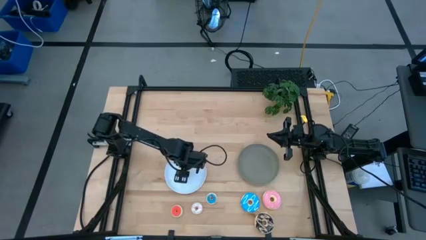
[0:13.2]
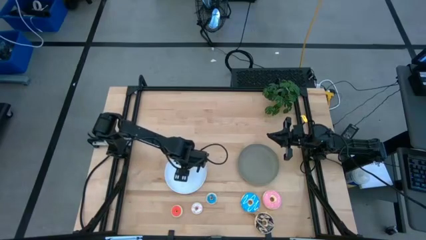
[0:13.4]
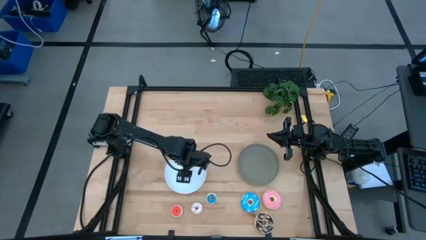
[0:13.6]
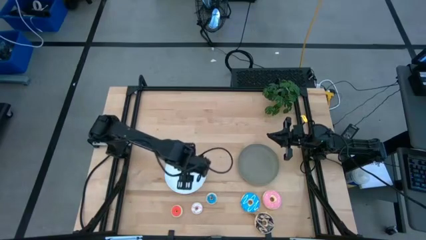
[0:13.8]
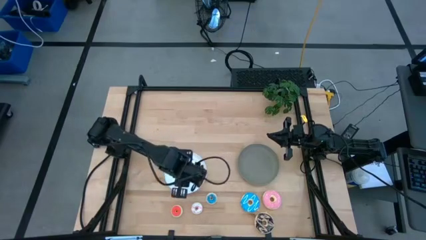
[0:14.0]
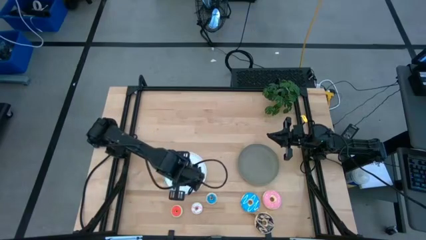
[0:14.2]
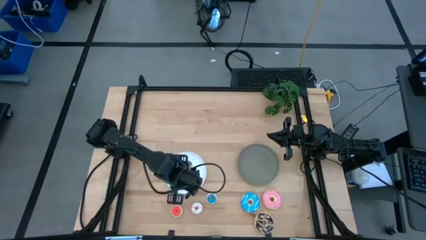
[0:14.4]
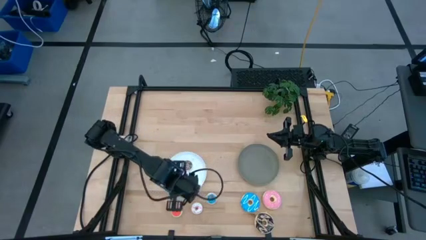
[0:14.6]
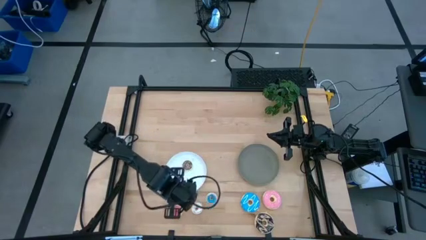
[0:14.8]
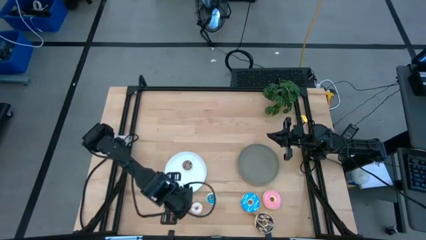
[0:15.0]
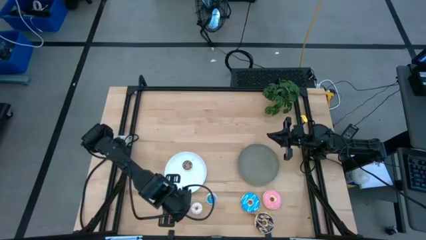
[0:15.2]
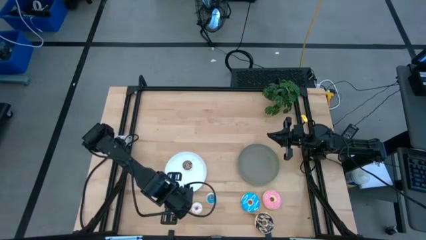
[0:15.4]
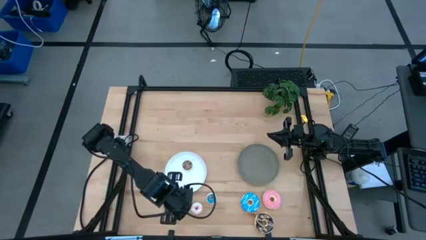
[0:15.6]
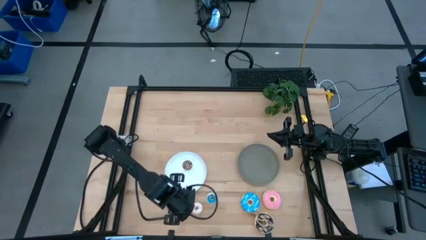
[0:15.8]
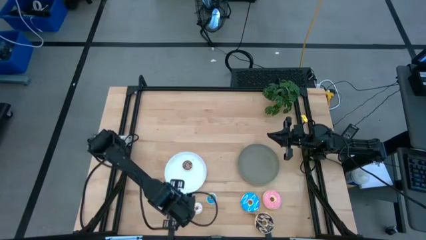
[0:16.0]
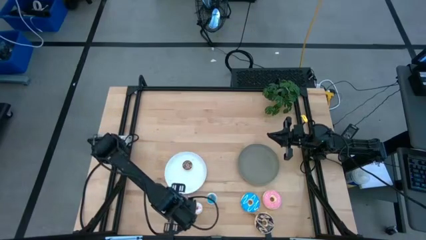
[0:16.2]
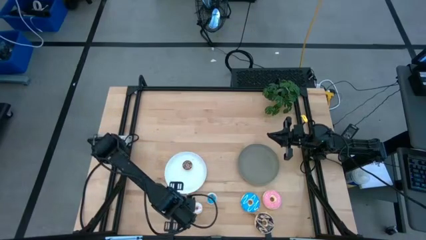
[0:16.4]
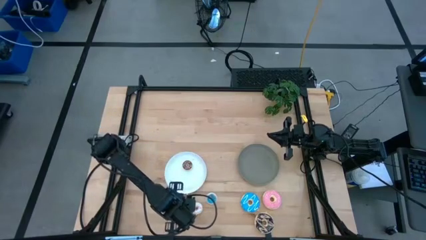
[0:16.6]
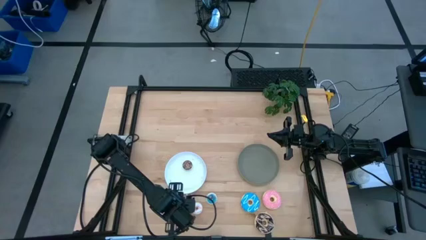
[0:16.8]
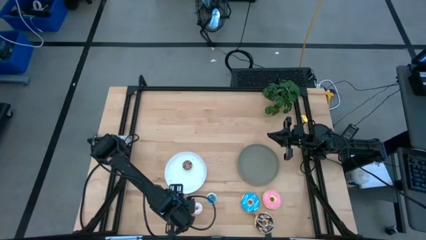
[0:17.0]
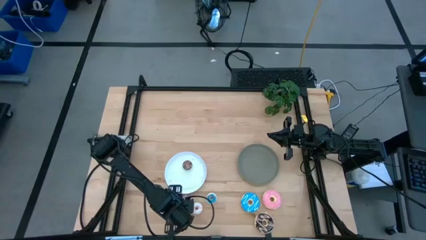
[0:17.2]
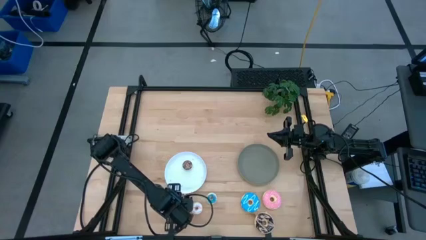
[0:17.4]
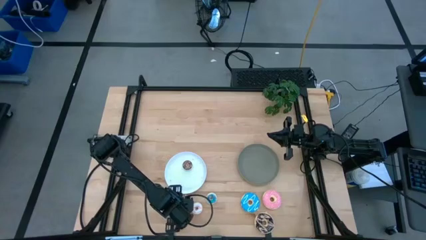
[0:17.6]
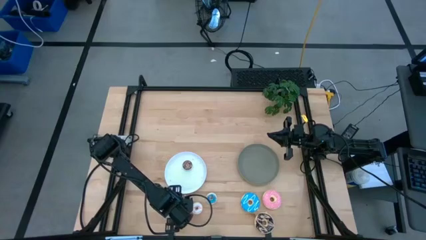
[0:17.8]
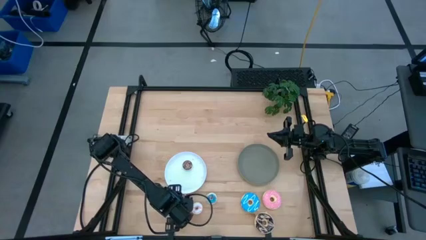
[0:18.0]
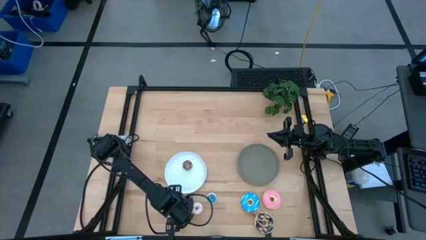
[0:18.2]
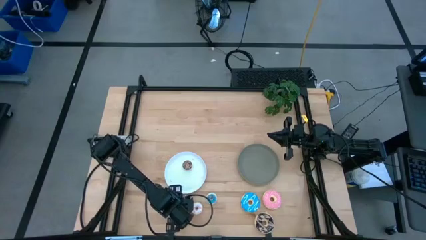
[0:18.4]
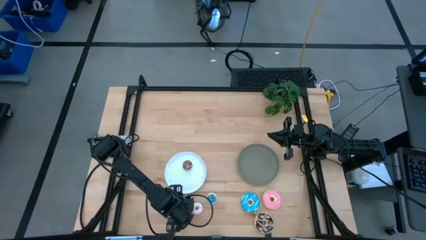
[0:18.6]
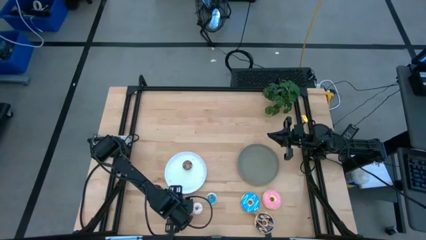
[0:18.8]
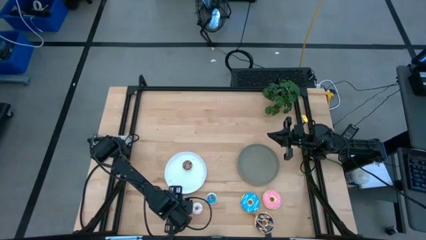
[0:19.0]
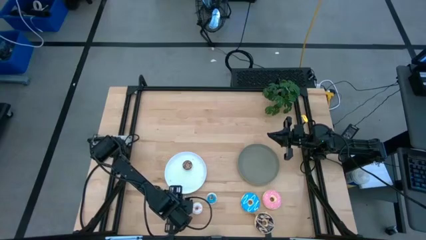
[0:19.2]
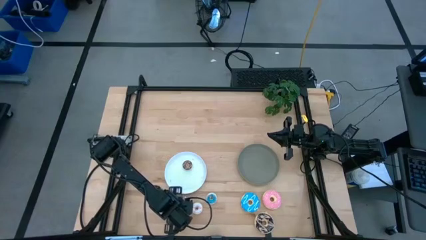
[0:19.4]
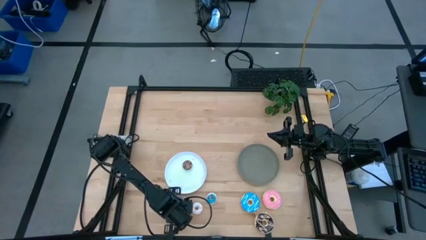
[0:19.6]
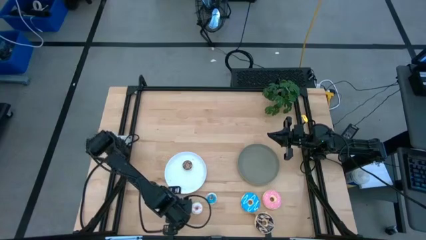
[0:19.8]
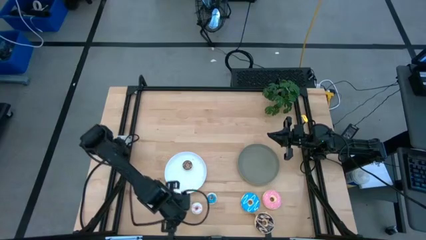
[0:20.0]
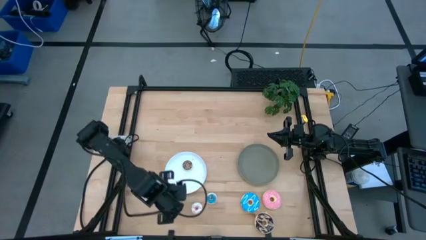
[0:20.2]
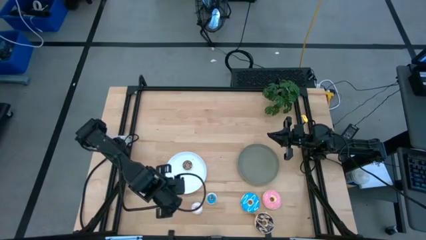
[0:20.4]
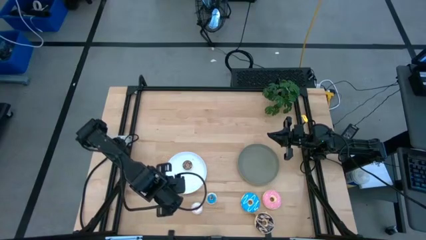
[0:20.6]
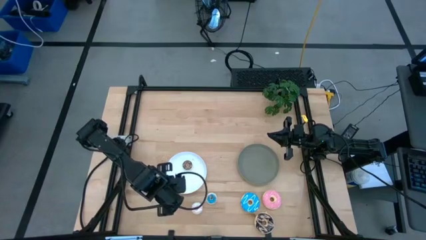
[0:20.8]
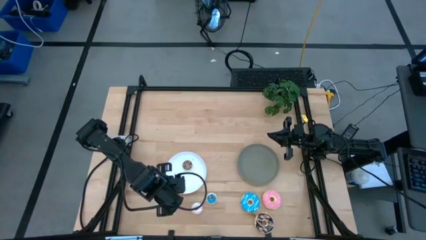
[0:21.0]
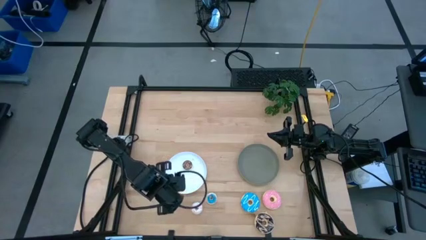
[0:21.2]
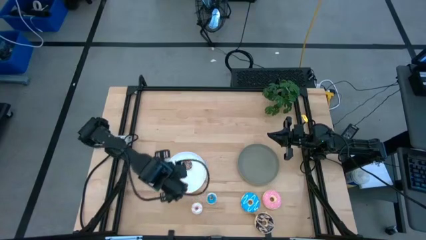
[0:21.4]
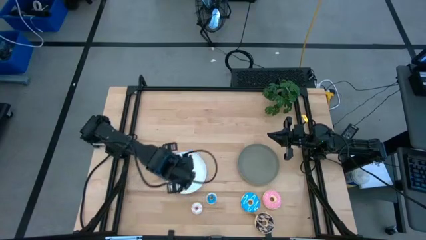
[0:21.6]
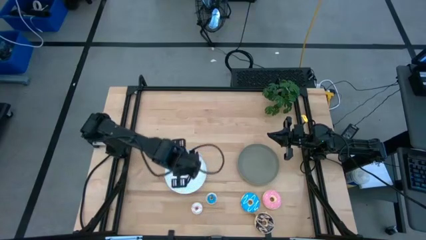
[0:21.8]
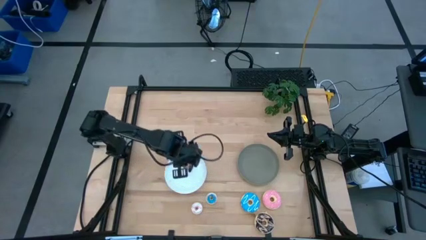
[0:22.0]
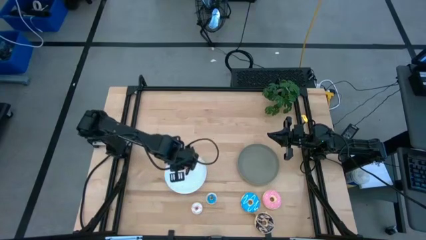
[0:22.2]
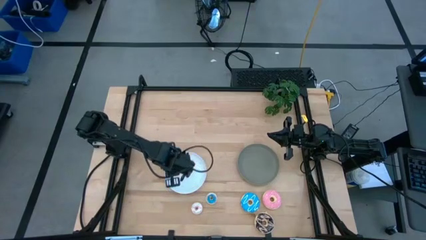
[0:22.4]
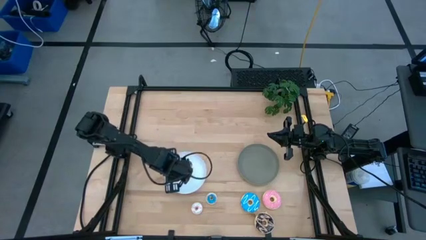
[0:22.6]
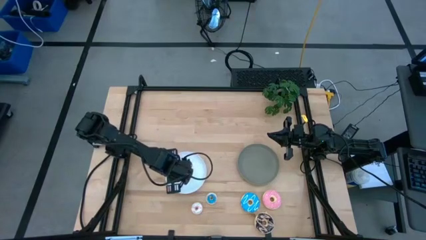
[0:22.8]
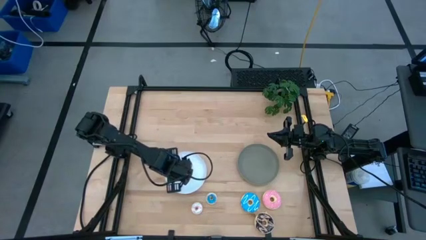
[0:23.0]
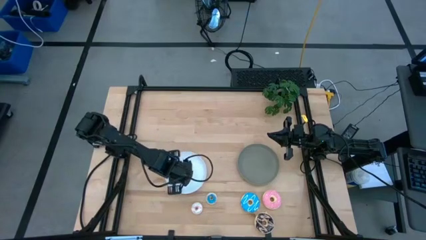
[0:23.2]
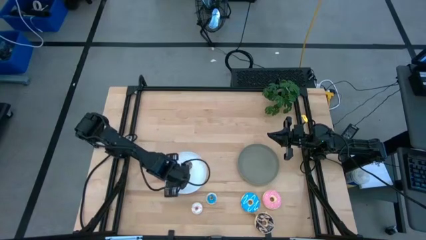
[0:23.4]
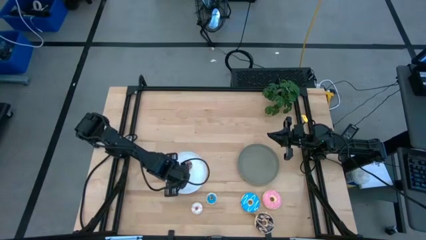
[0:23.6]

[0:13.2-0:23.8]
Task: Pick & Place donuts
Put the small orange donut on the white plate
